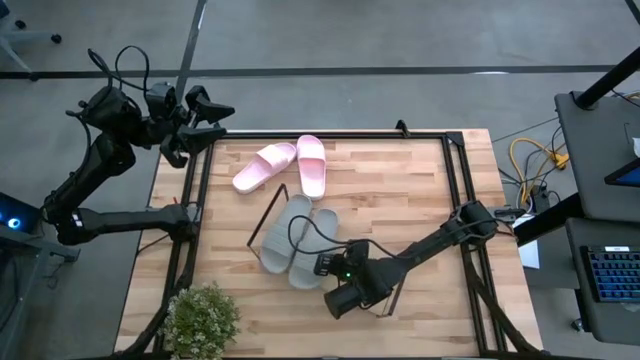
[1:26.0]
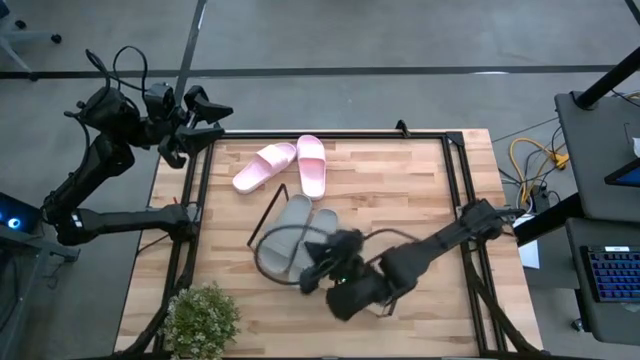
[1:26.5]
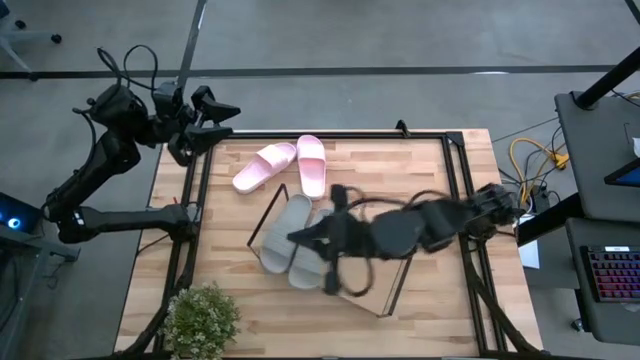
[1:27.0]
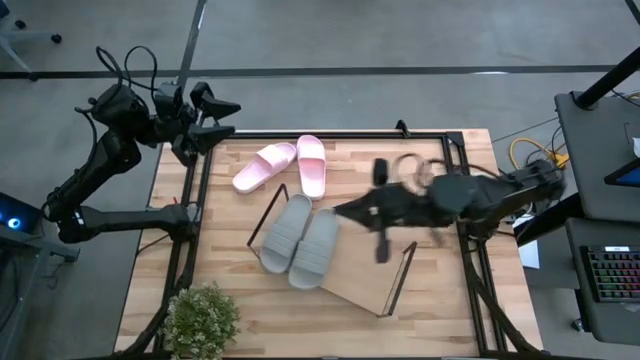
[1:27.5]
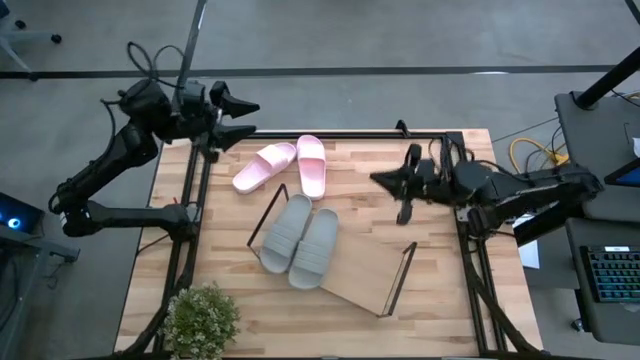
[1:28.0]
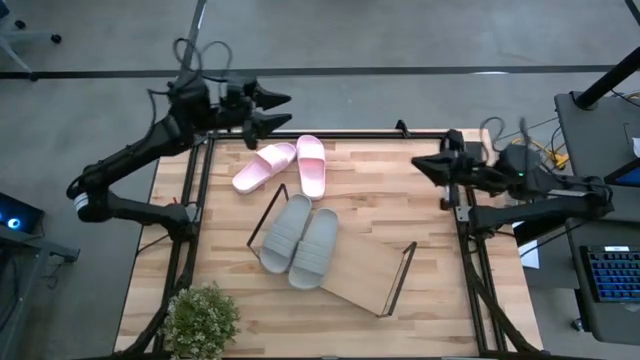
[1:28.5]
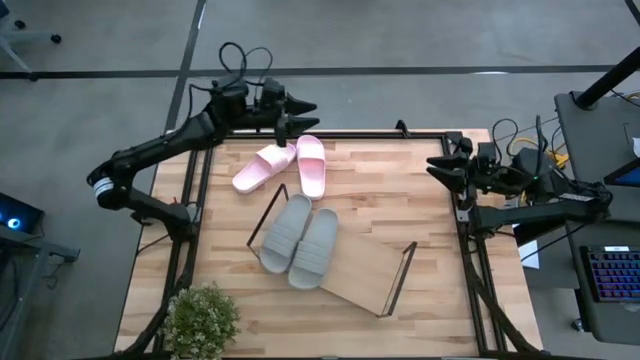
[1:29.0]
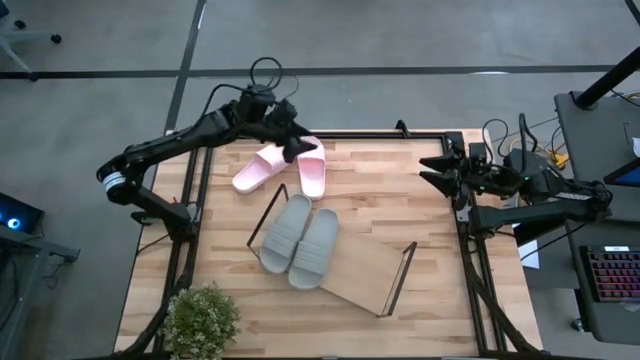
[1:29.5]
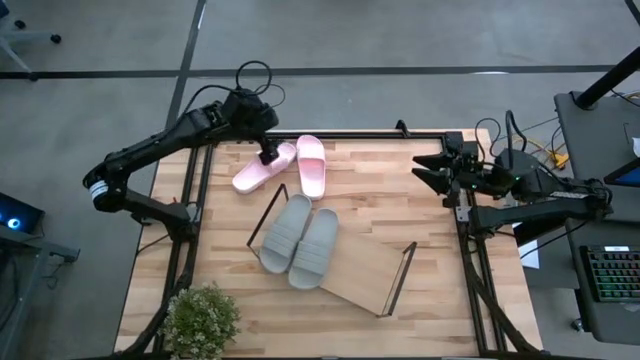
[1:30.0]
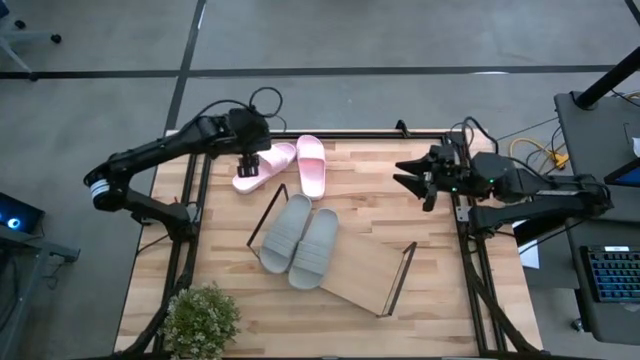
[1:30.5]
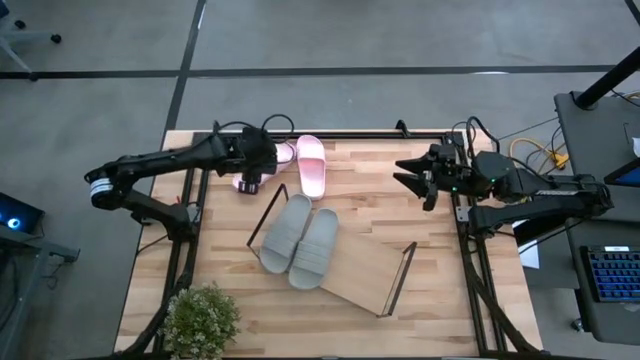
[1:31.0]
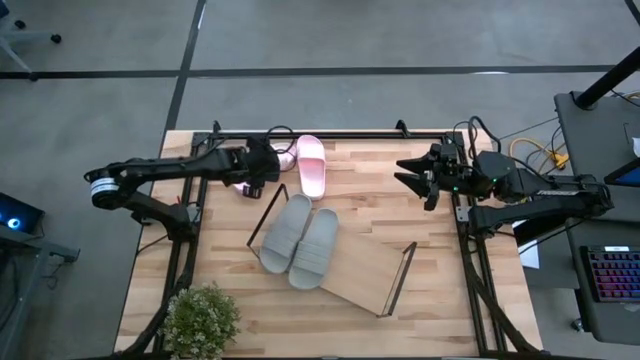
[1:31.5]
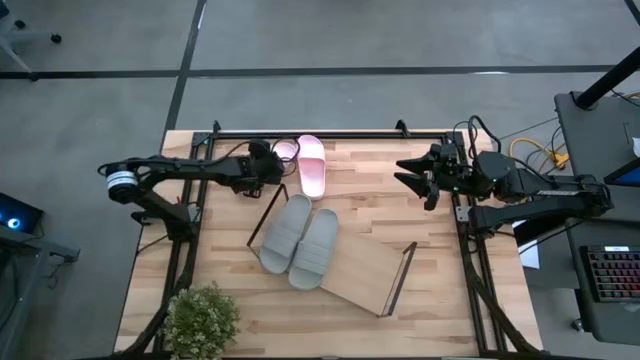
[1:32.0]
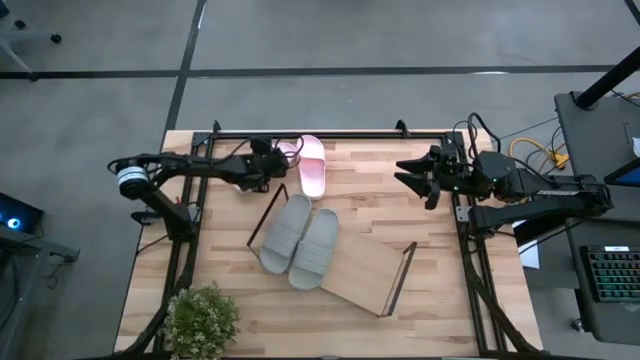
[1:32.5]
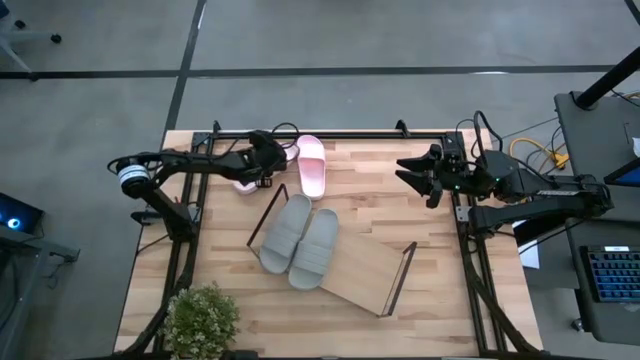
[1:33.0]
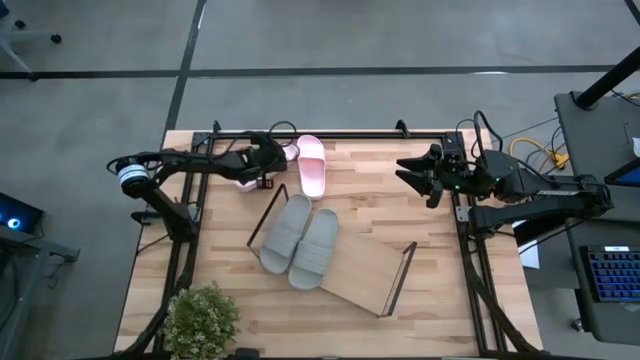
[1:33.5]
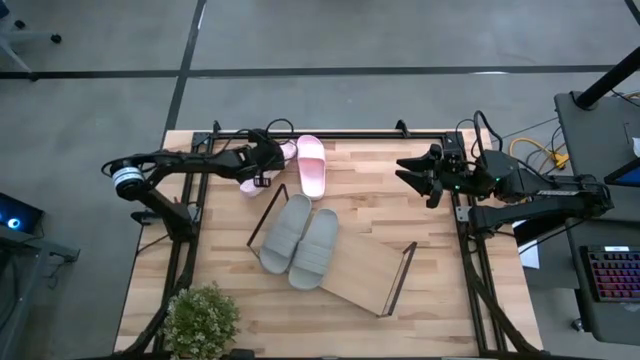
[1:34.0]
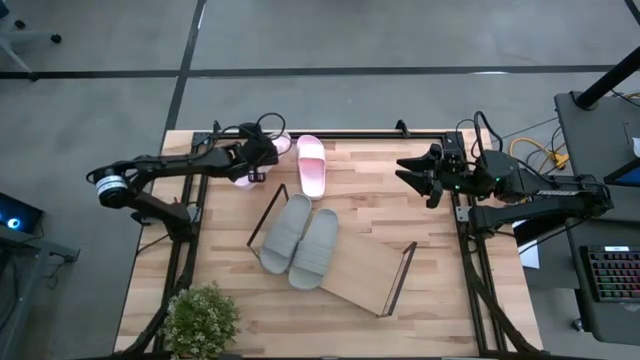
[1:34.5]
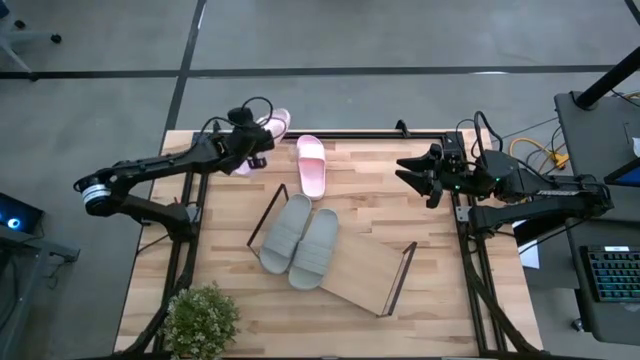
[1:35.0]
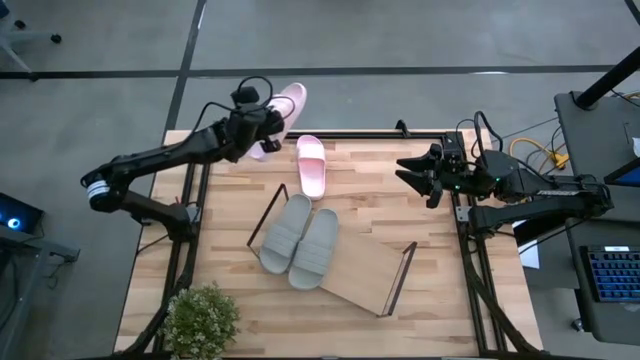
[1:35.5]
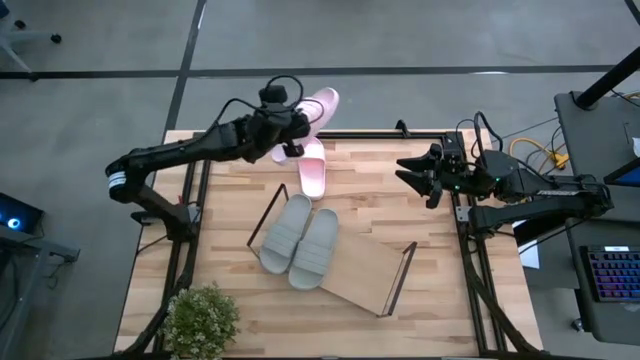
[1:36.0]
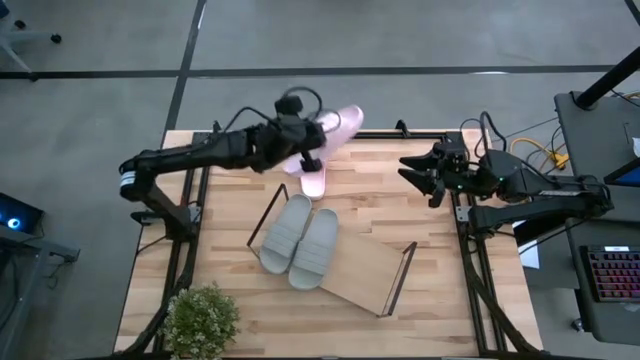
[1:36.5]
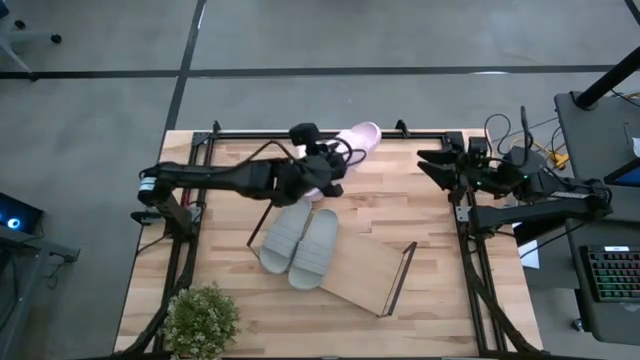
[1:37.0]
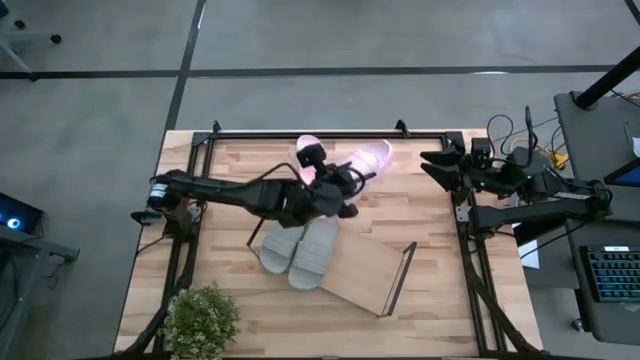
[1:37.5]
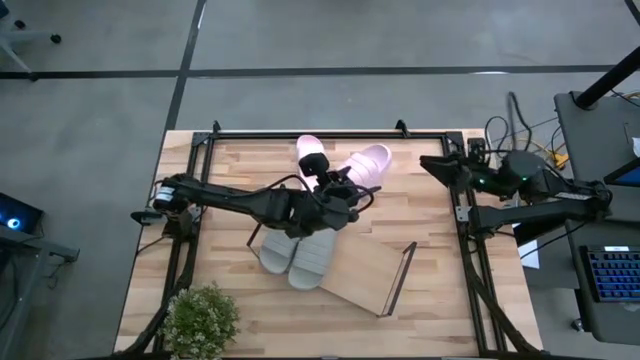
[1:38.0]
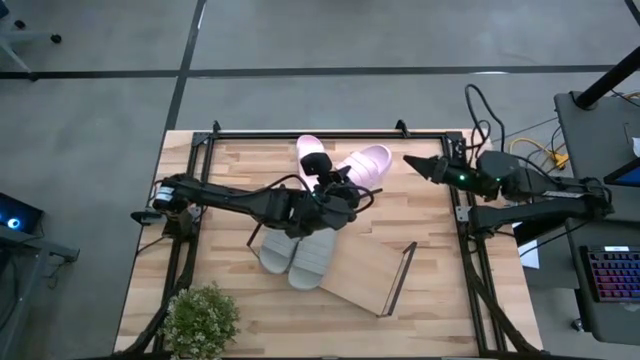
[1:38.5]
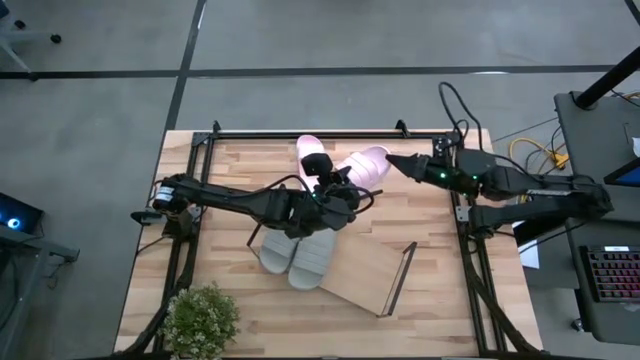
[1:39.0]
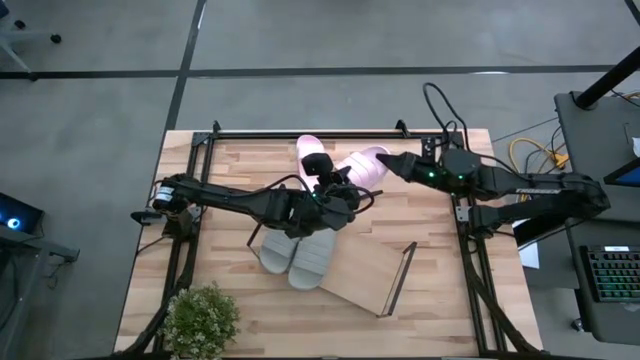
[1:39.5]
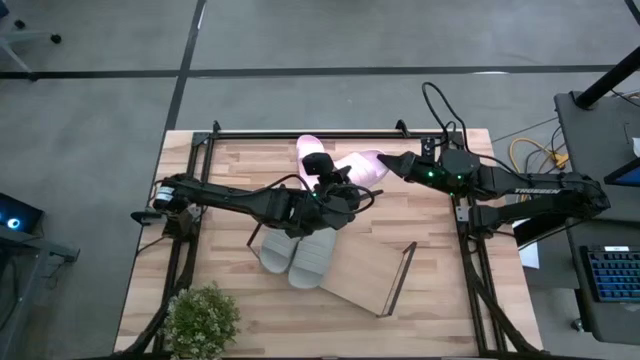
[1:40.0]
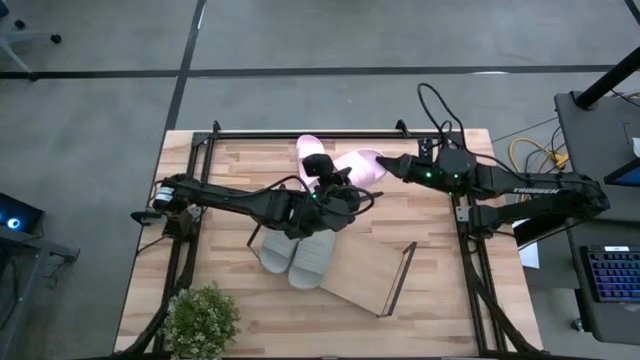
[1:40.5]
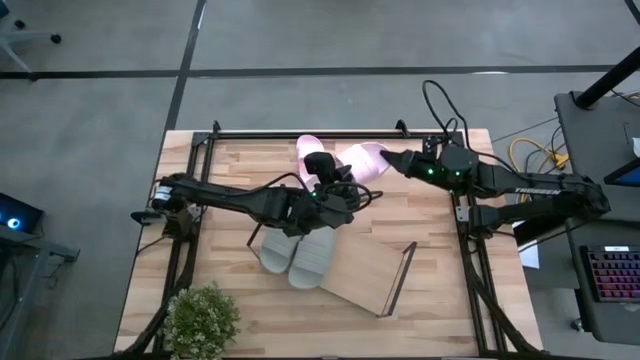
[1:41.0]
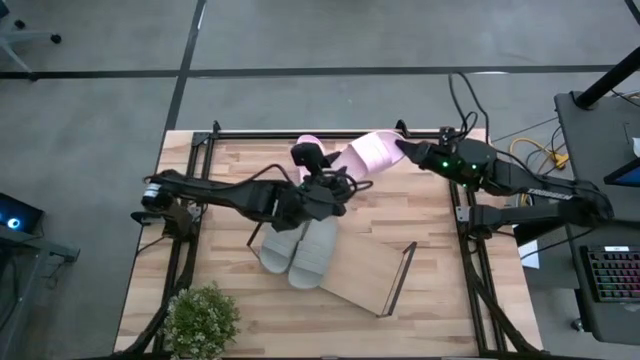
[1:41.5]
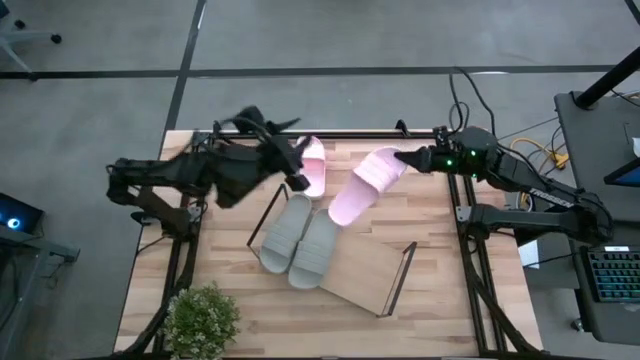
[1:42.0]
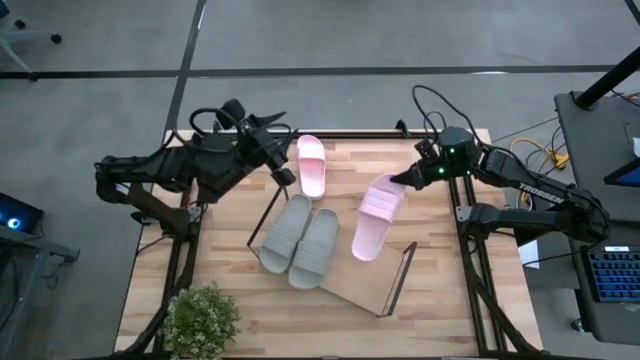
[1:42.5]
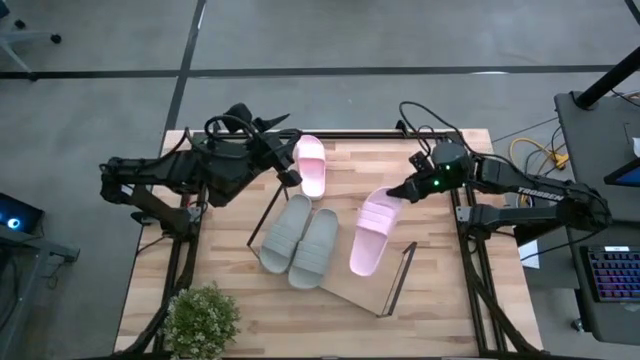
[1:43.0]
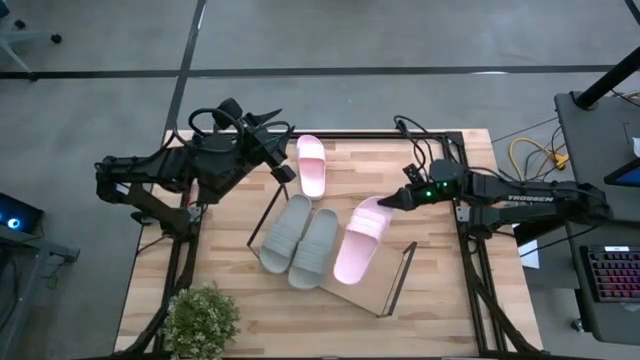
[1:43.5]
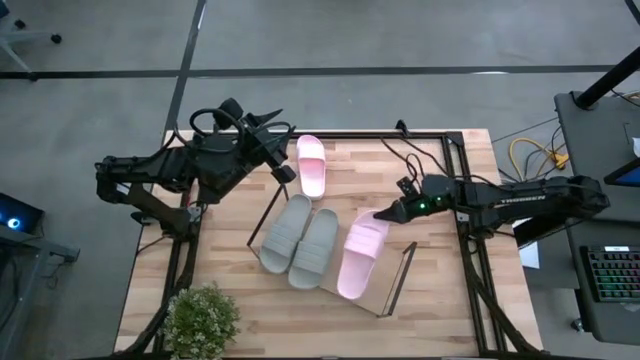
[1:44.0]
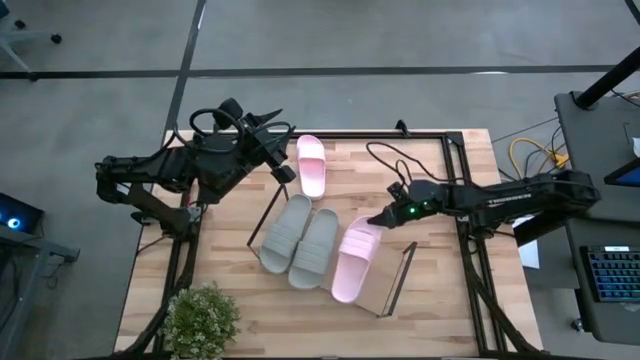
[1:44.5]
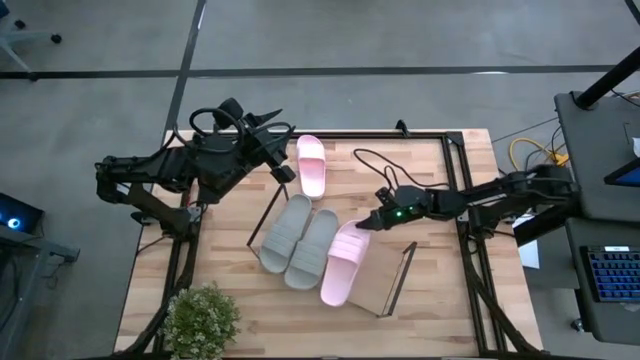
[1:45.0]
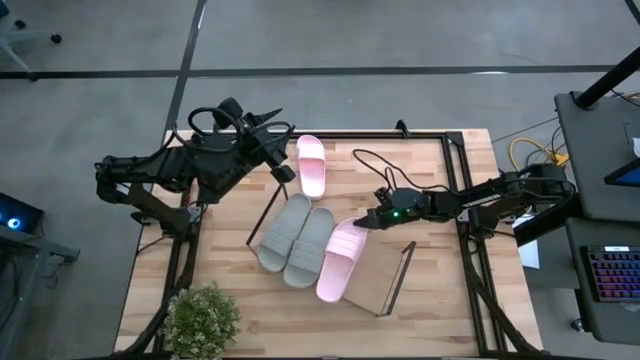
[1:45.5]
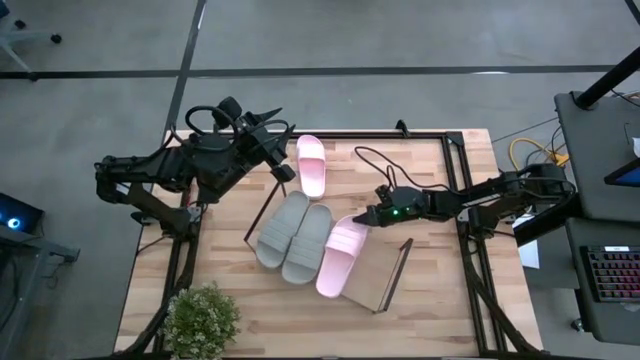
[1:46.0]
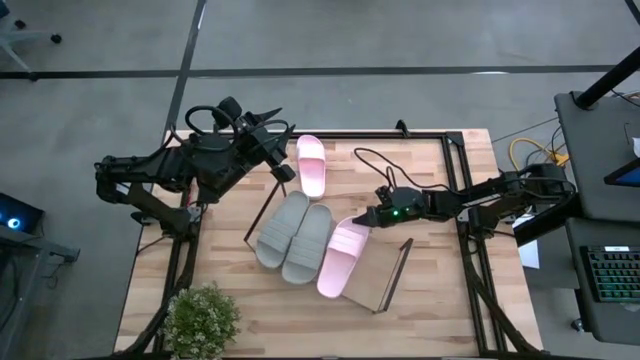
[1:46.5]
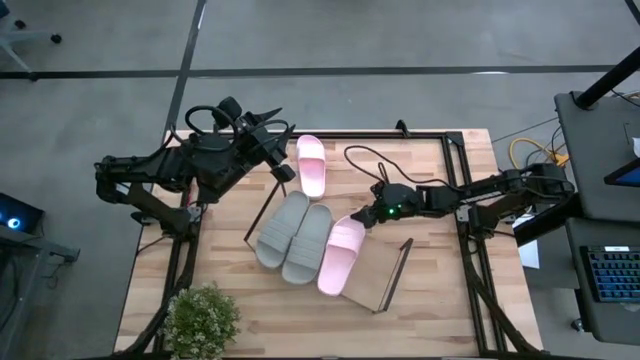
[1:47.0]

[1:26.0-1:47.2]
Task: Pick and place slides into the shelf
Put the left pink slipper on the shelf
